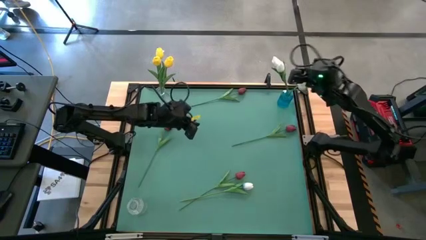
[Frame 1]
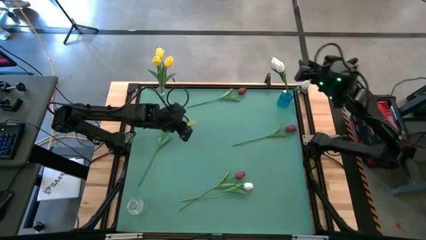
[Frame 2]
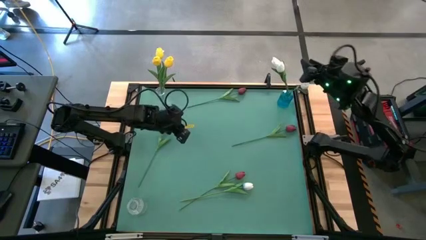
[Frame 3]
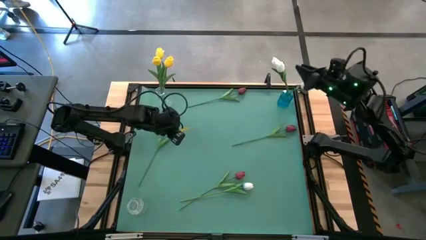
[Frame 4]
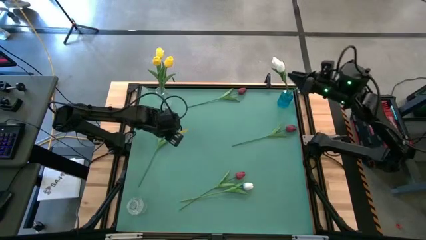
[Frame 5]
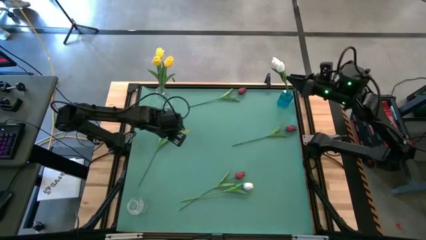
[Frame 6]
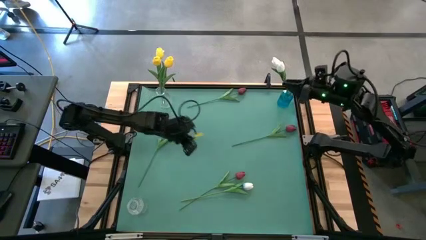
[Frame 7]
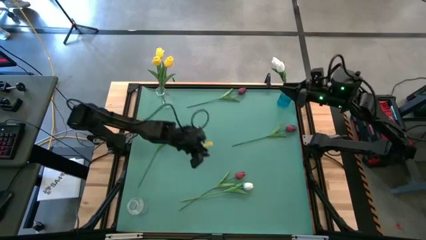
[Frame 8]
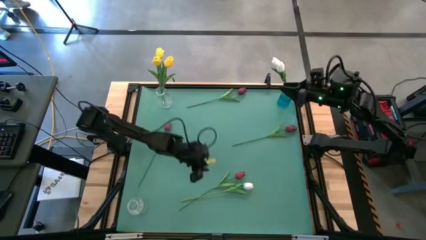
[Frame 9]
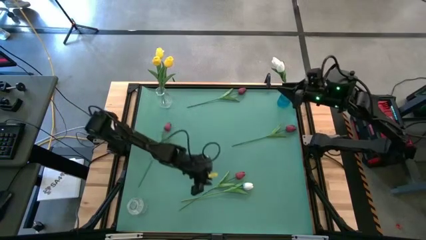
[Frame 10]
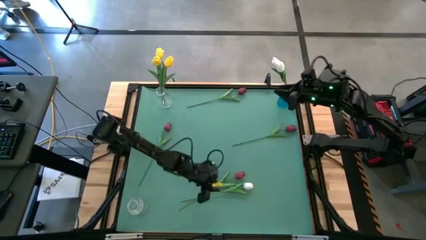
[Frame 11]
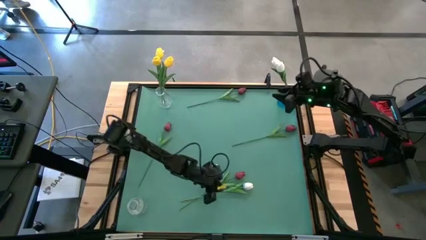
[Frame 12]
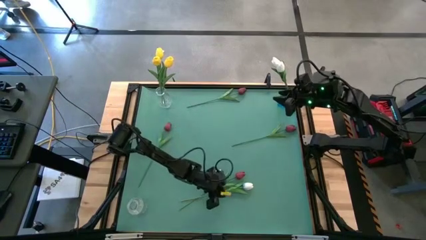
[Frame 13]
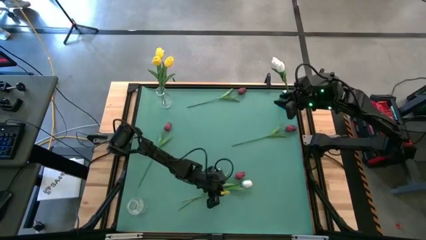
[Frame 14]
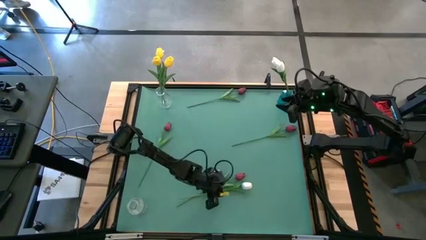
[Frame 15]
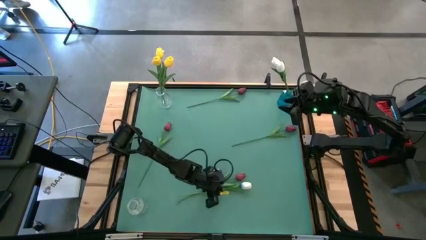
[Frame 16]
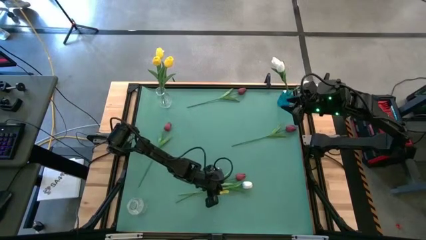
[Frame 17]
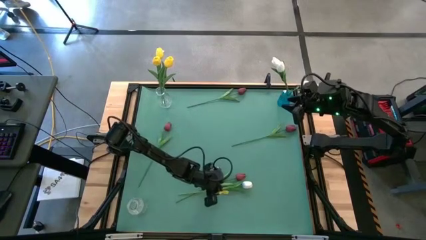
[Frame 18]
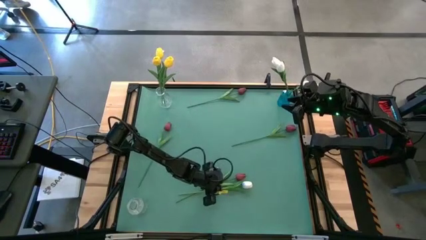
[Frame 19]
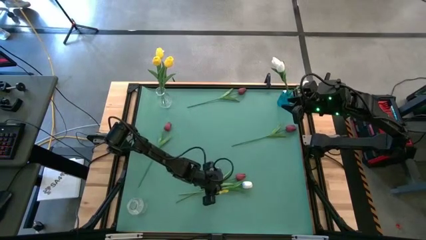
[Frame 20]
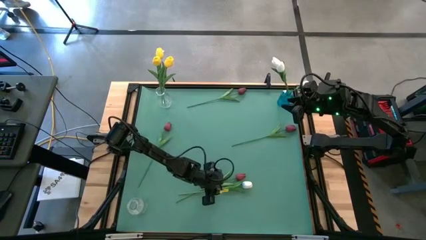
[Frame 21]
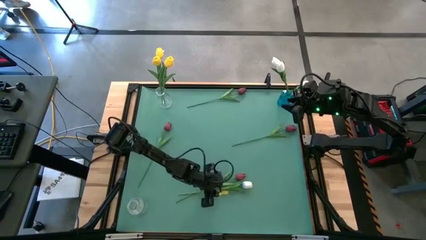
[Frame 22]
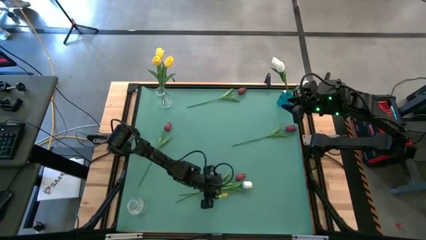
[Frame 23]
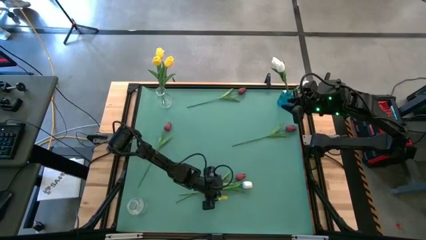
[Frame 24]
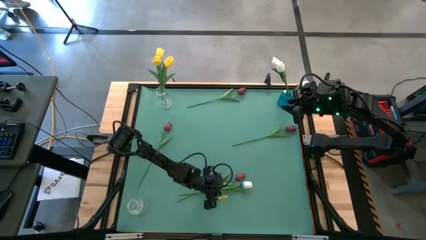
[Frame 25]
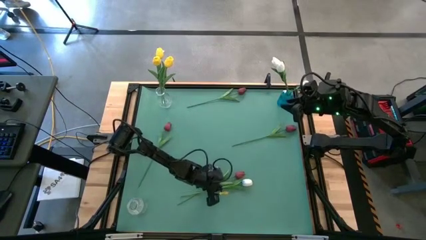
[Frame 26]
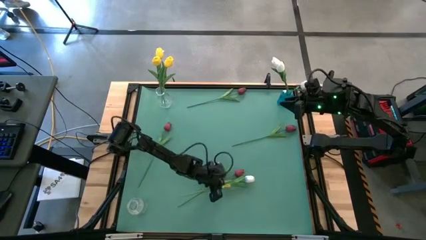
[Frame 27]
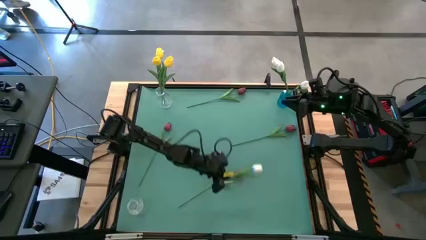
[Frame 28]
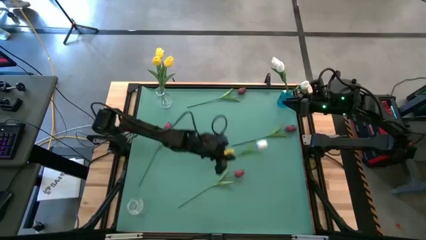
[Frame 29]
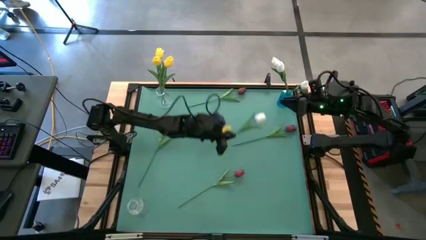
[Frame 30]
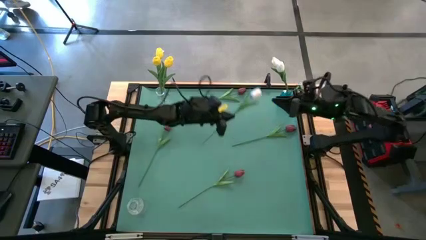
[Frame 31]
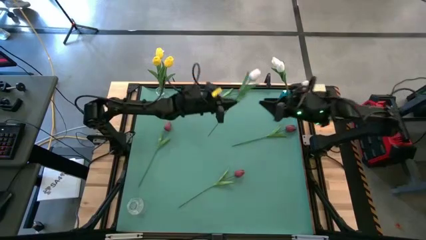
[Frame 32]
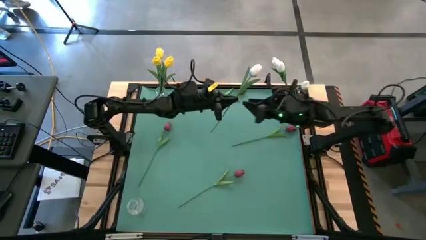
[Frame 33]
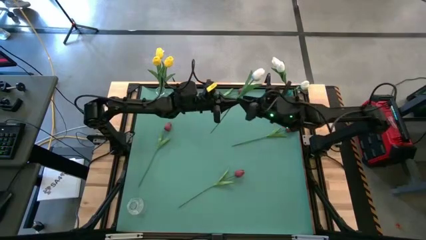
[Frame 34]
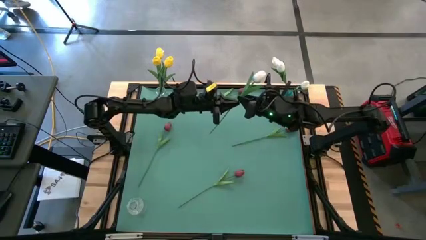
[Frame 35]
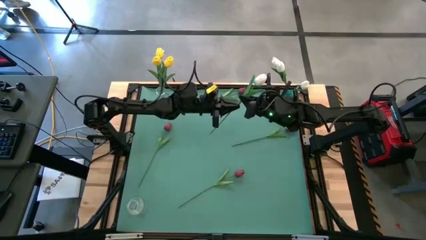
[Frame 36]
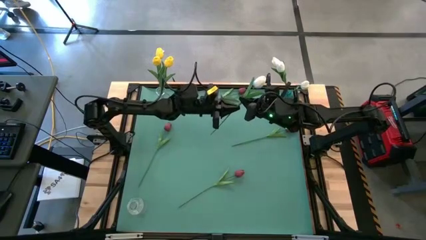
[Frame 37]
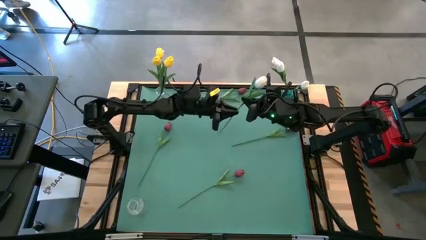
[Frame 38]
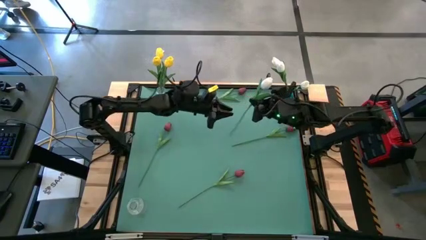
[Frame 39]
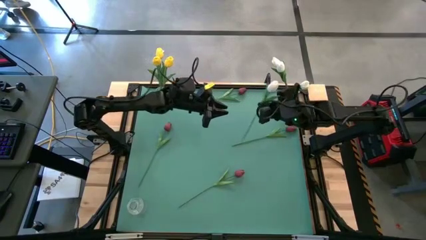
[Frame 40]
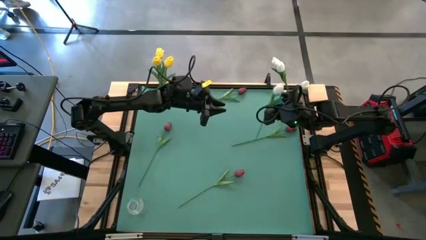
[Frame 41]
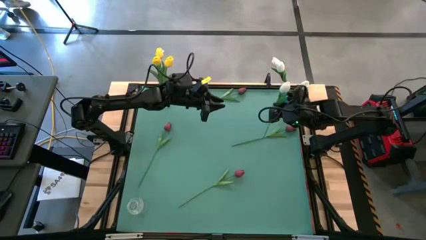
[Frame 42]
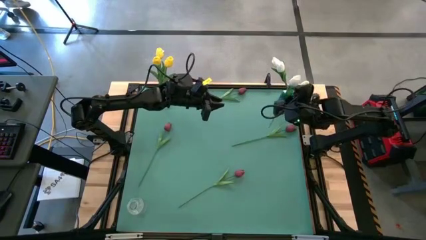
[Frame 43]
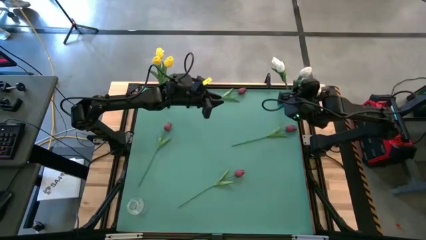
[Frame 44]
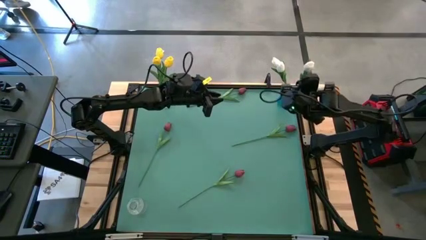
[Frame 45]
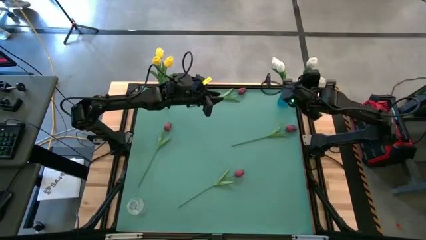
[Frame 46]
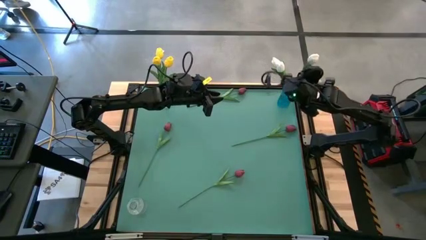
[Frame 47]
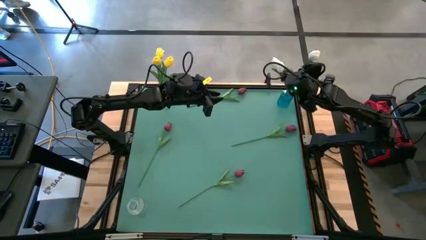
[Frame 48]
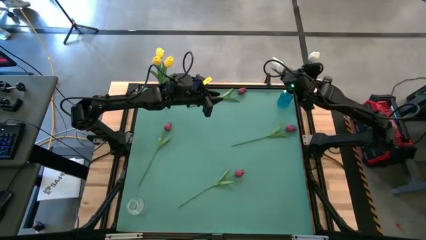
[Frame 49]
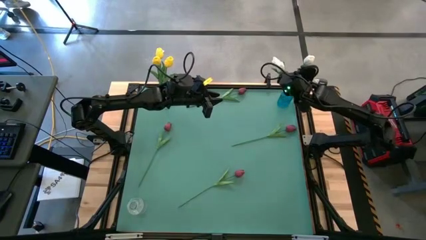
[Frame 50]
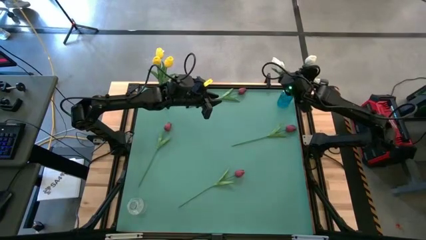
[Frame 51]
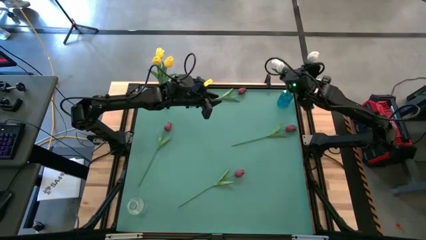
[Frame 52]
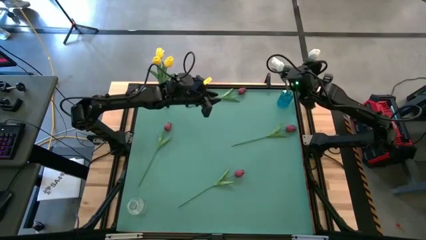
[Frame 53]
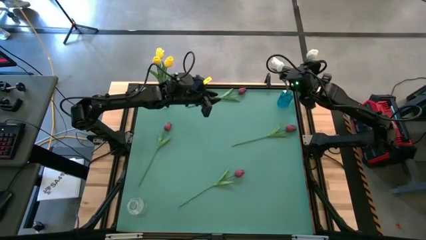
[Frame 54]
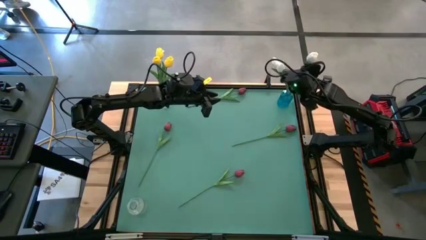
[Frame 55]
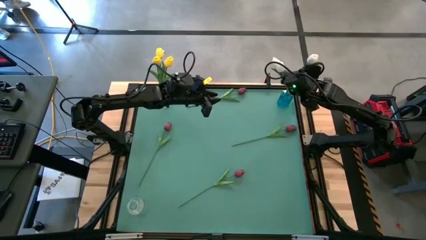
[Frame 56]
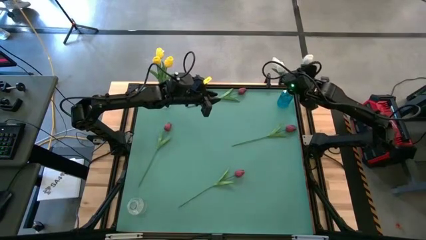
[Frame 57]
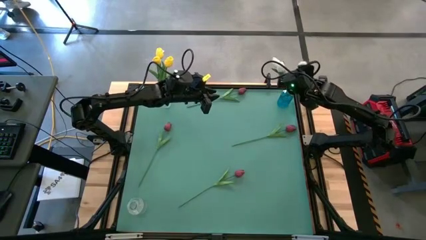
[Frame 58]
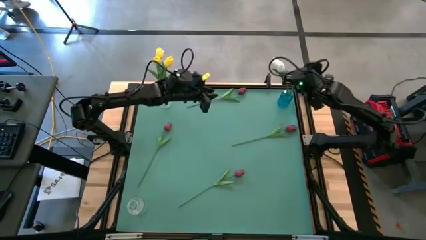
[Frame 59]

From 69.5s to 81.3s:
Task: Sort flowers into vase by color
Put the white flower into the blue vase

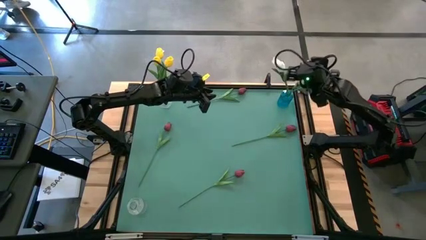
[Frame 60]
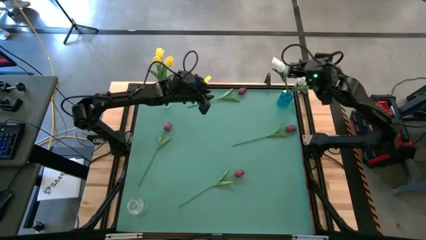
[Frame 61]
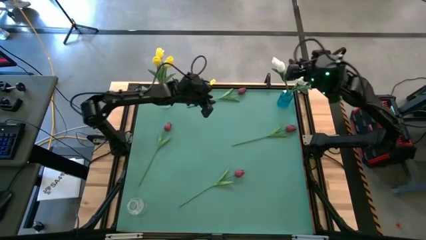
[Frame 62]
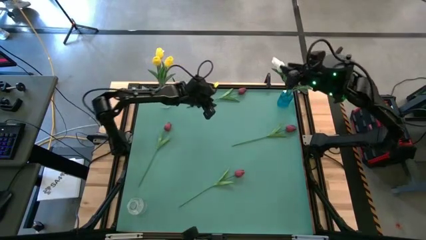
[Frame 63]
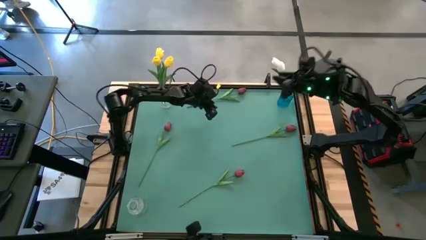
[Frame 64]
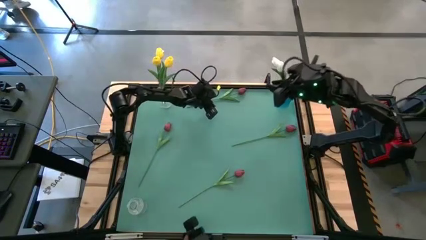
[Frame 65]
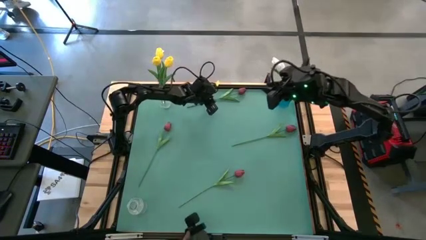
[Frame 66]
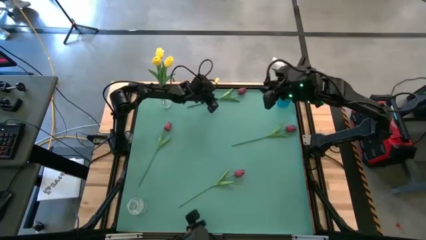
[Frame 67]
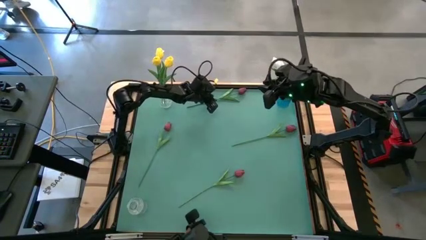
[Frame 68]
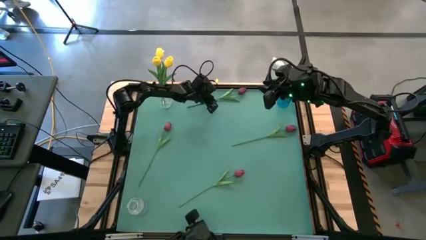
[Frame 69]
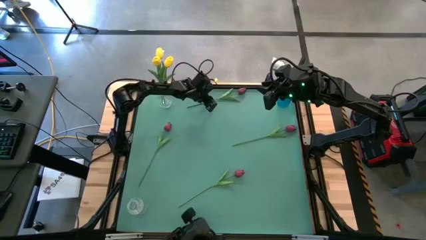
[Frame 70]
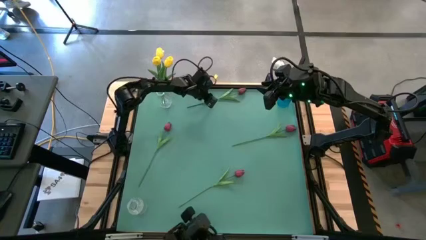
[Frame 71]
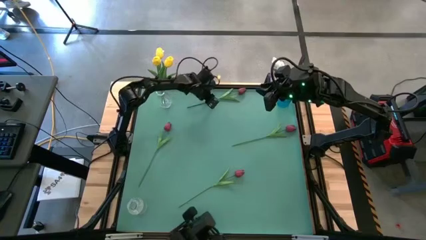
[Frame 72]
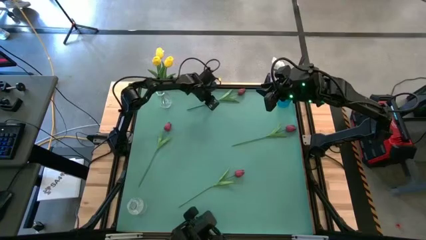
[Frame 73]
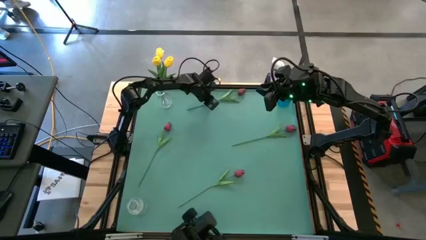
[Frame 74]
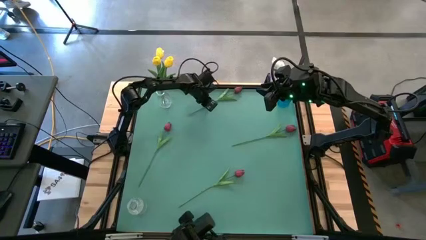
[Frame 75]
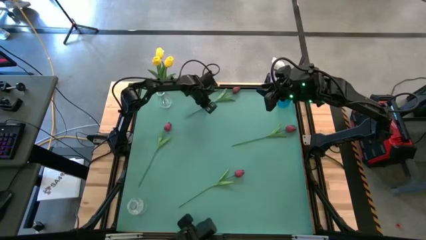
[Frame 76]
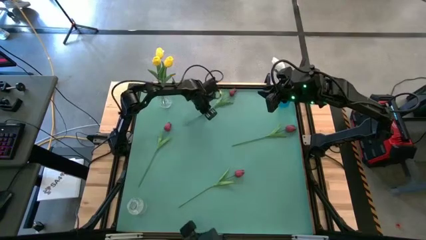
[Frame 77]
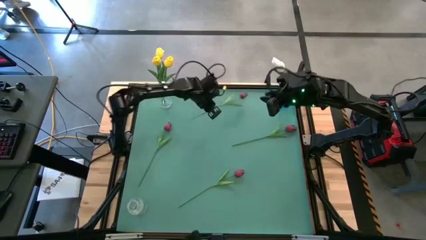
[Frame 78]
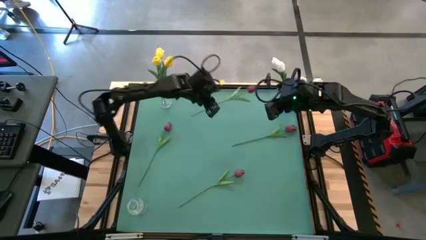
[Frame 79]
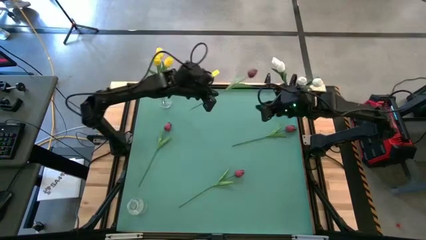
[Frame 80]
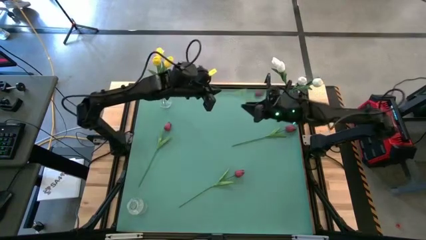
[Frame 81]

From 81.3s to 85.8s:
Put the top red flower into the blue vase
